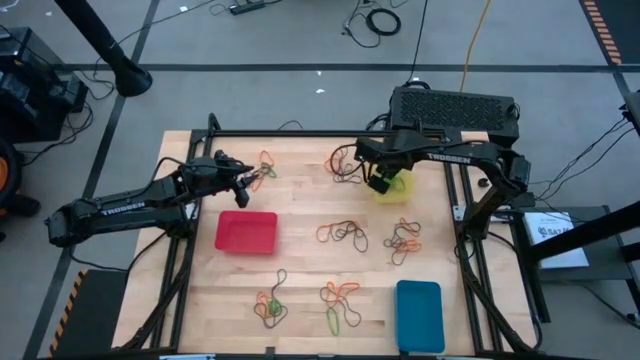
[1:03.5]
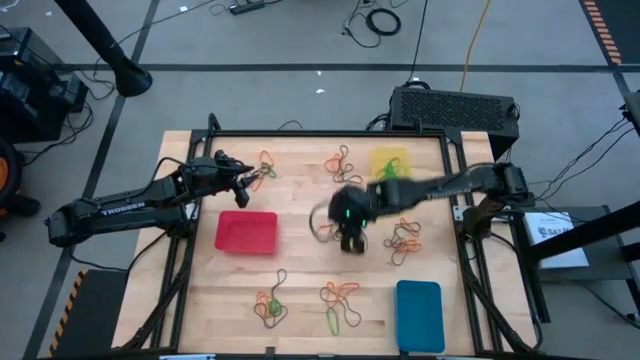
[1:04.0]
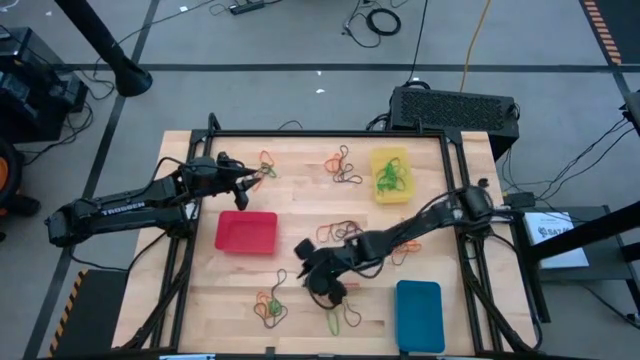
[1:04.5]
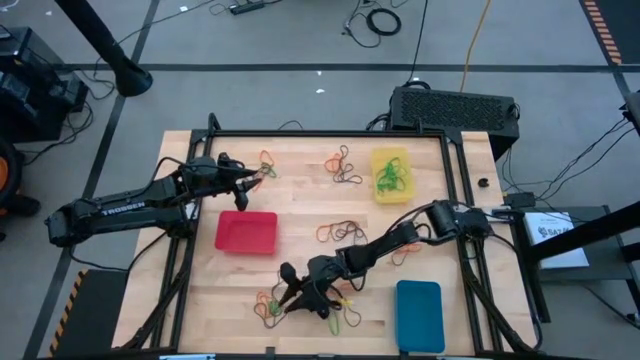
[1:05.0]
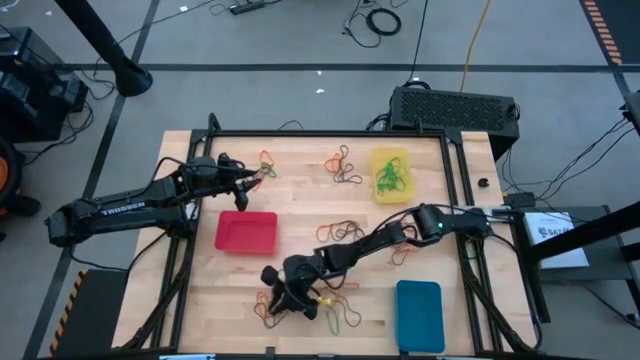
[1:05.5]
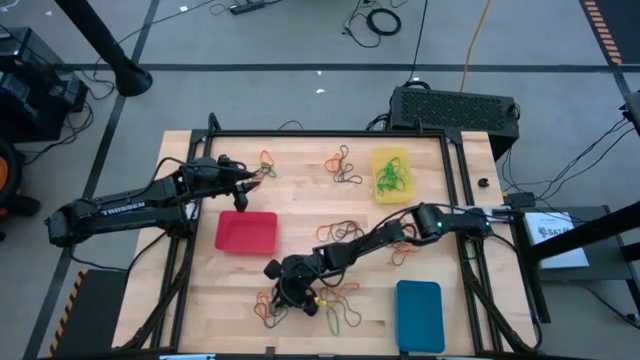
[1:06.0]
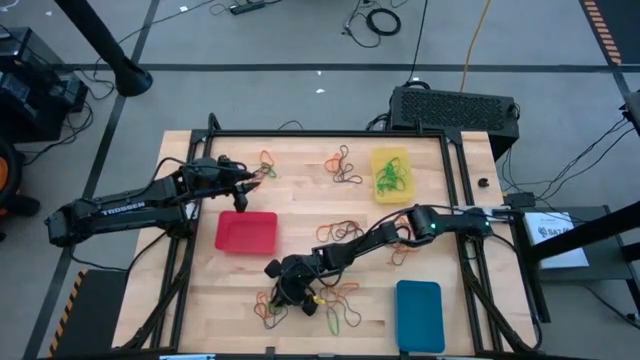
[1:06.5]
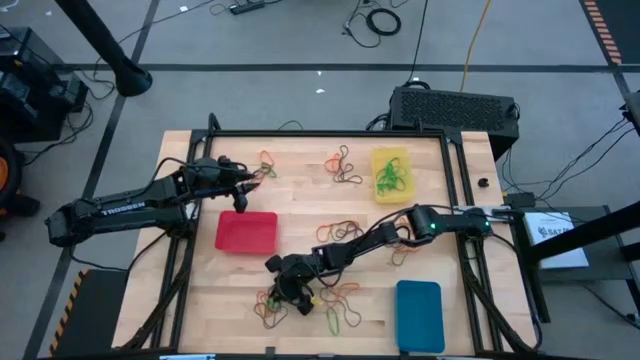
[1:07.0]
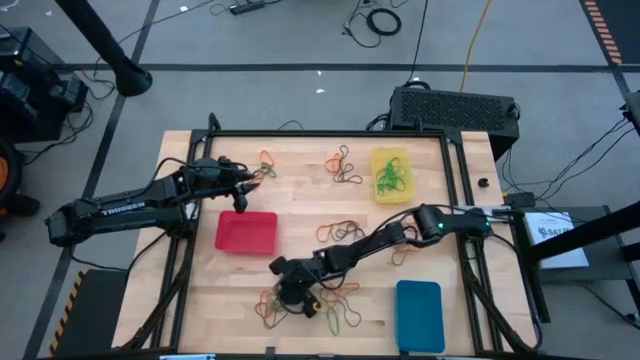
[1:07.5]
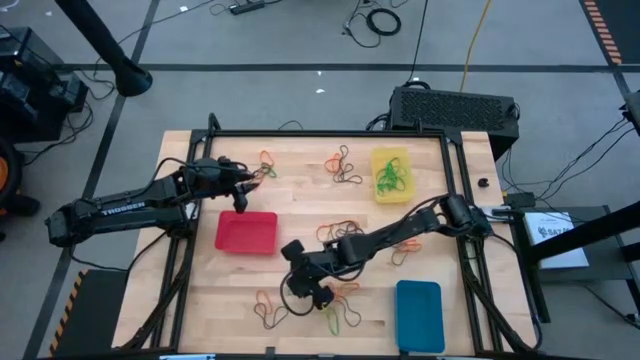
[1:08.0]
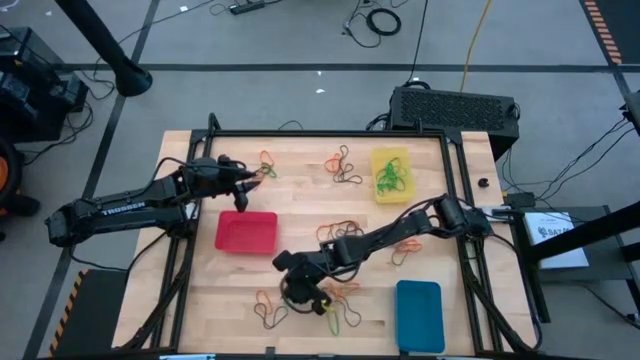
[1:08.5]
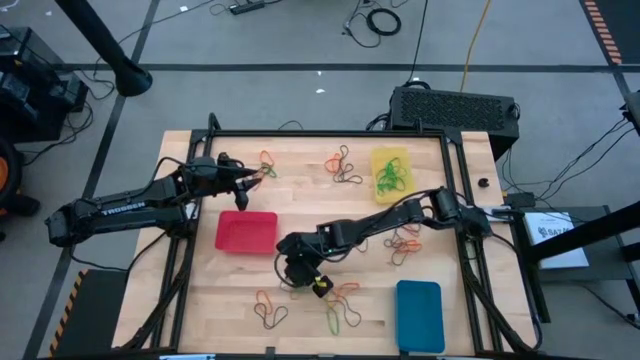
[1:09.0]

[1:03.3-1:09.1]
Task: Sort rubber bands into baskets
Put the green rubber band into the yellow bin

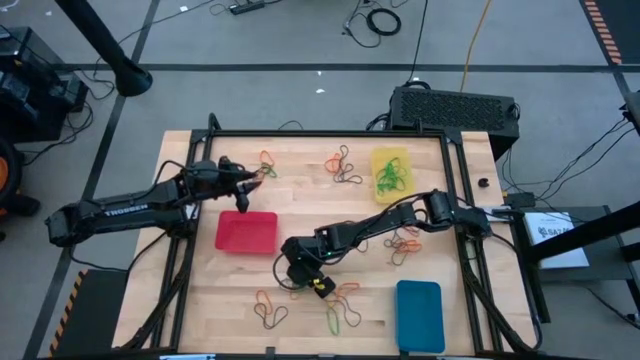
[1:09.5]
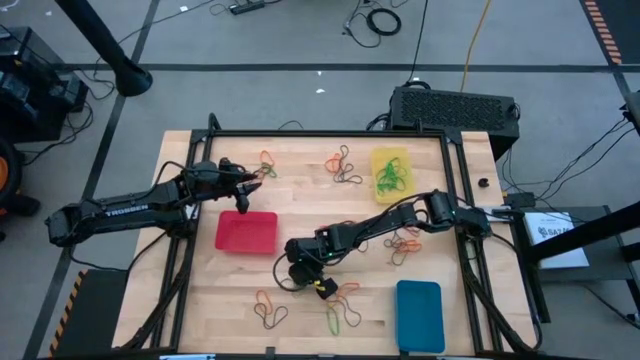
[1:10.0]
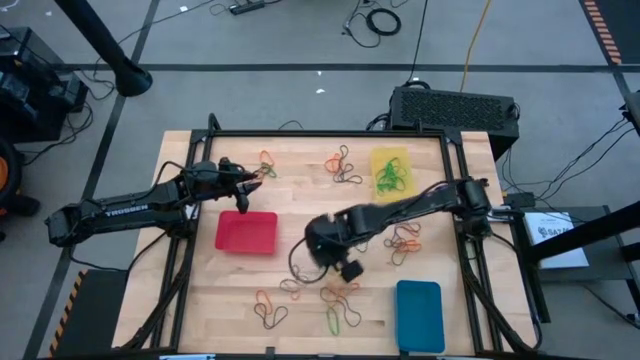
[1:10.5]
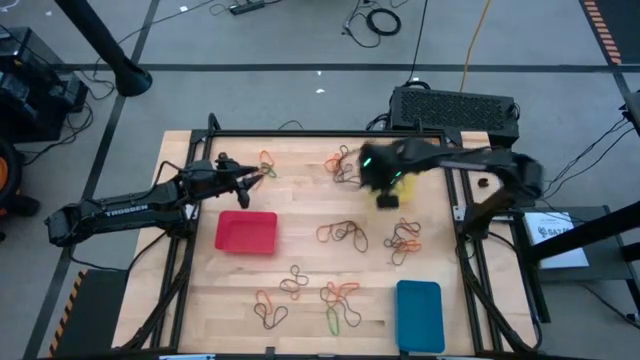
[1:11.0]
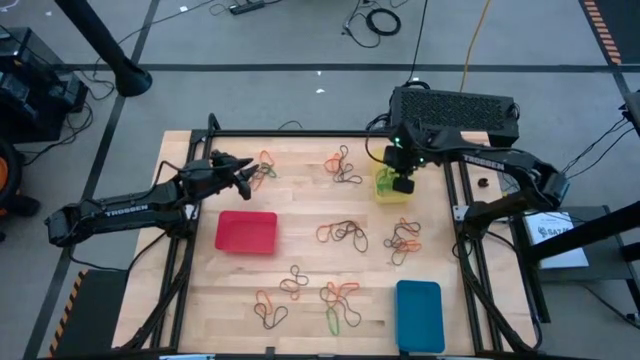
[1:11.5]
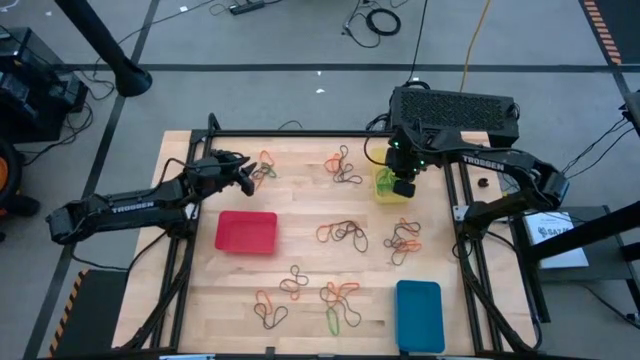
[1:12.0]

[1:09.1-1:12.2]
Put the green rubber band into the yellow bin

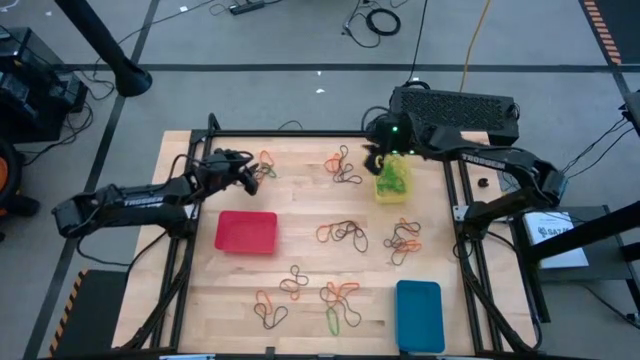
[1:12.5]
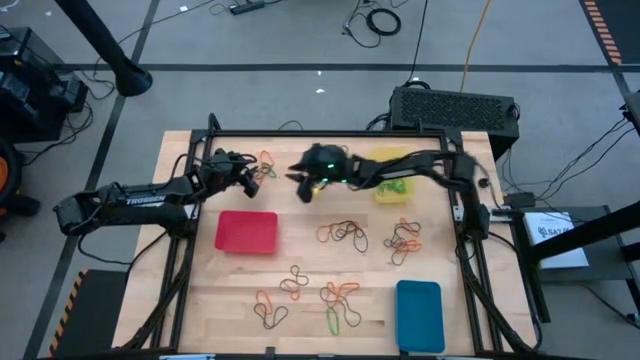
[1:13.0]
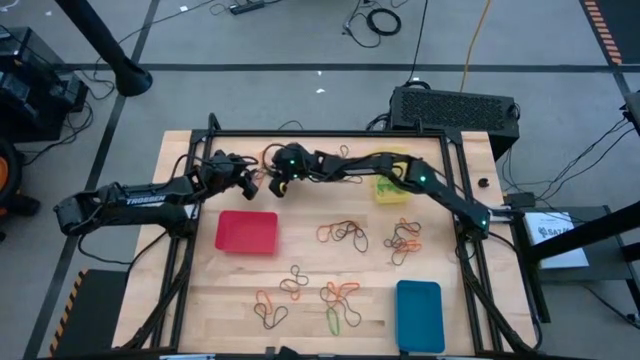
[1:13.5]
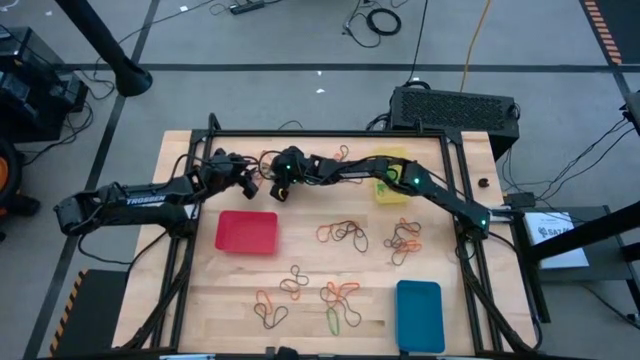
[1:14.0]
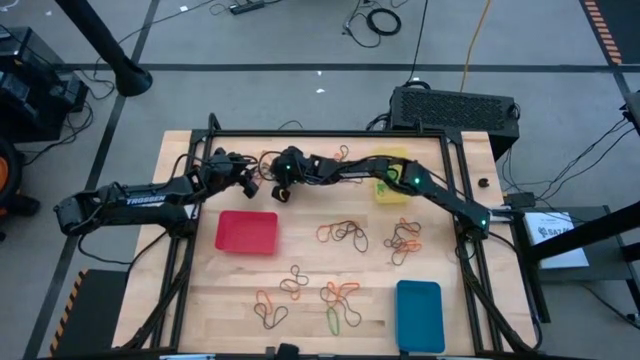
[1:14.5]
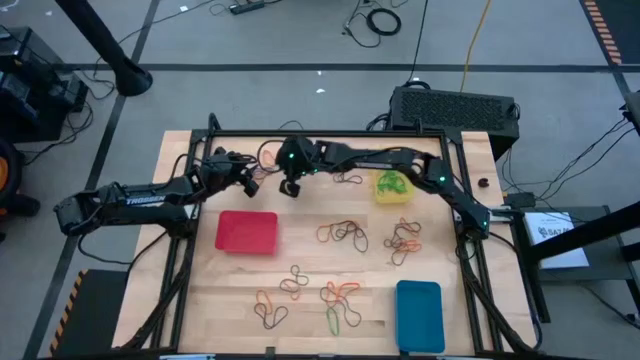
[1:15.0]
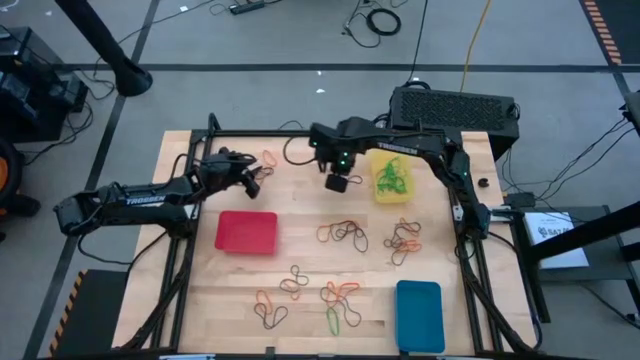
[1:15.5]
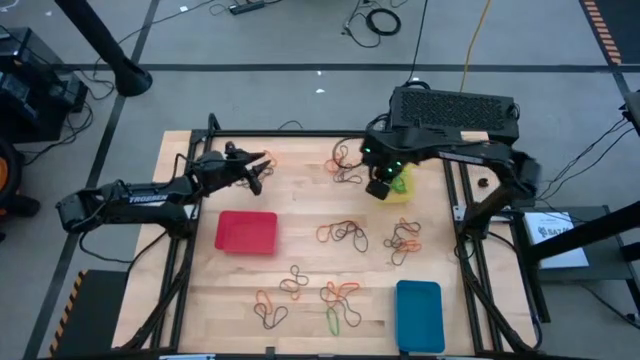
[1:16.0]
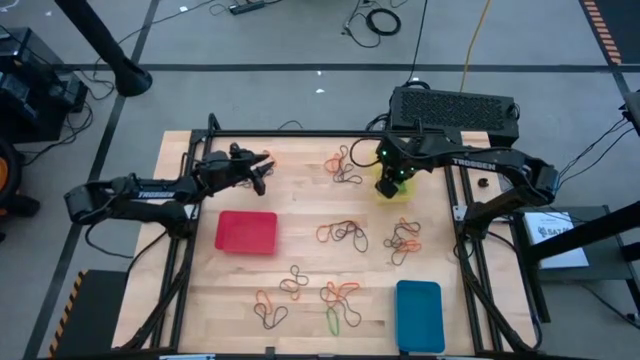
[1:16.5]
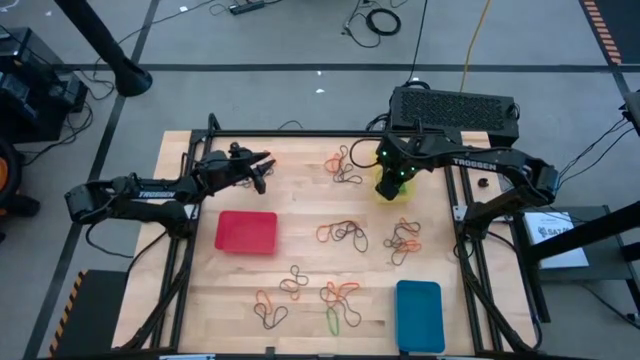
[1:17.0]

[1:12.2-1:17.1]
Put the green rubber band into the yellow bin

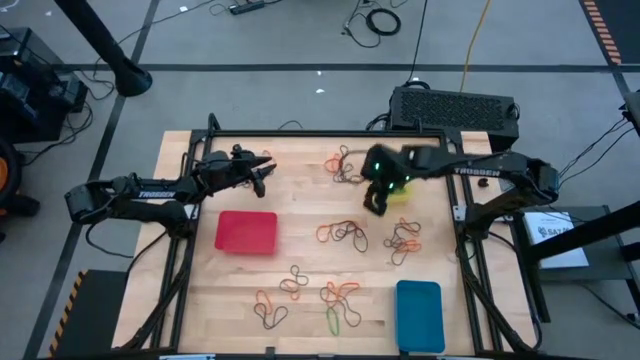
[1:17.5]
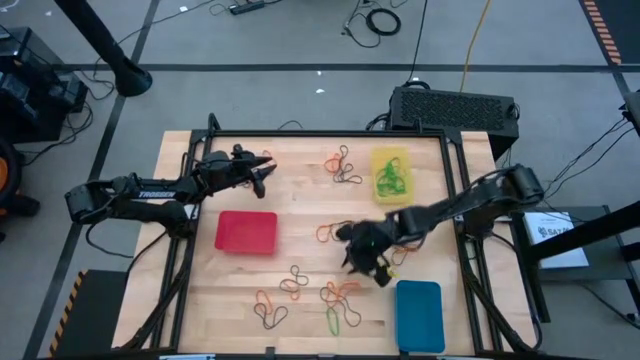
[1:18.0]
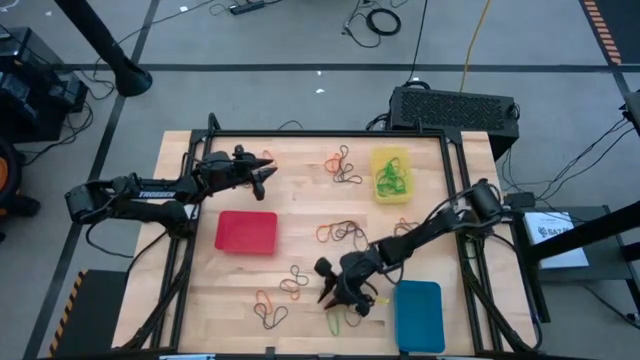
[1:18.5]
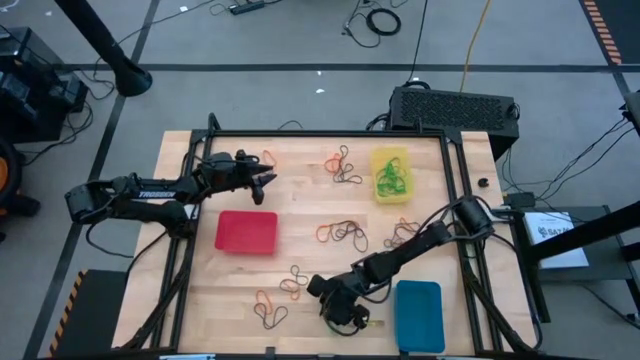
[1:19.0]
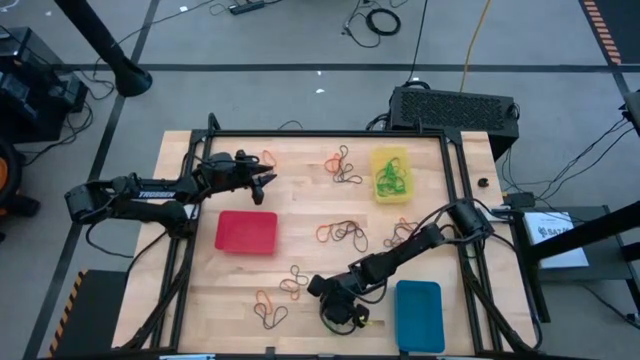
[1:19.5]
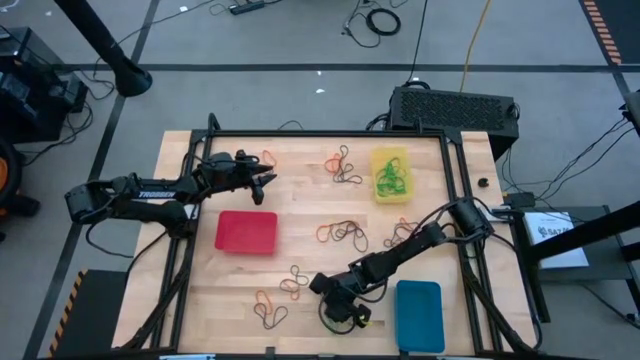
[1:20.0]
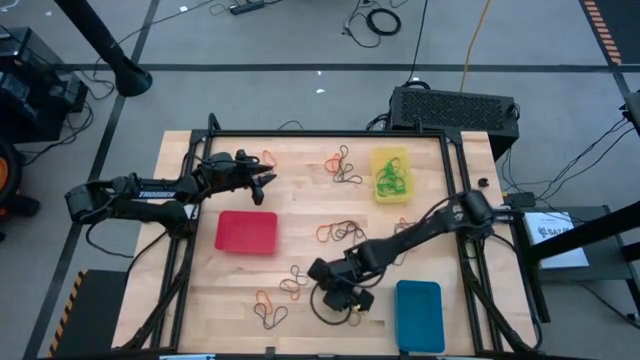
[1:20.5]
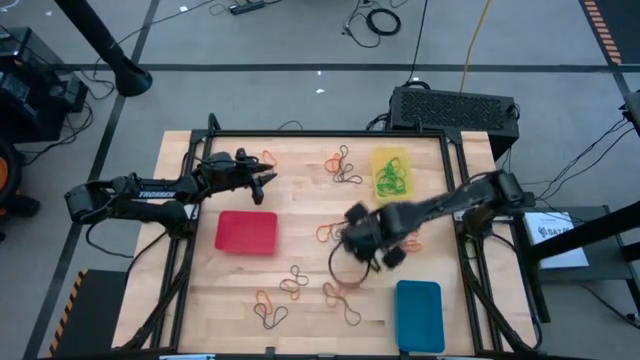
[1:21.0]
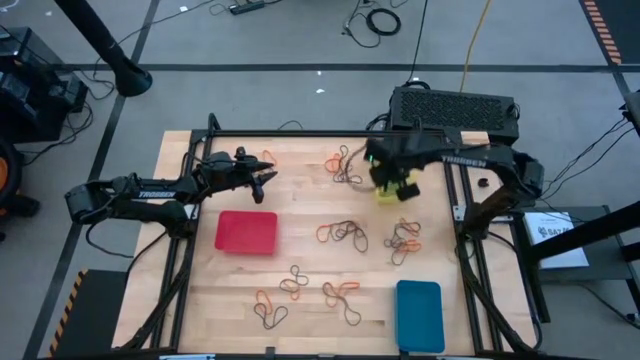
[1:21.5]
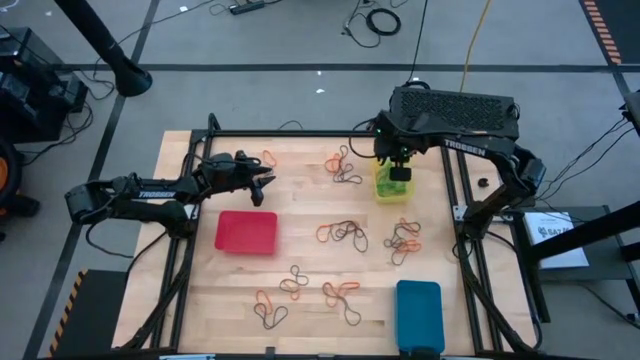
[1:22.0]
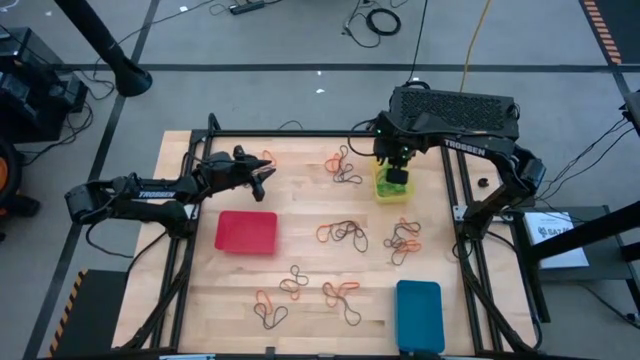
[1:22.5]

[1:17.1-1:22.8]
Put the green rubber band into the yellow bin
